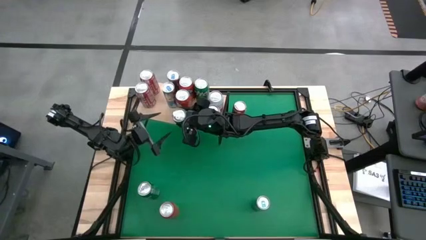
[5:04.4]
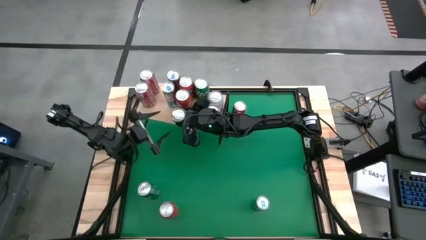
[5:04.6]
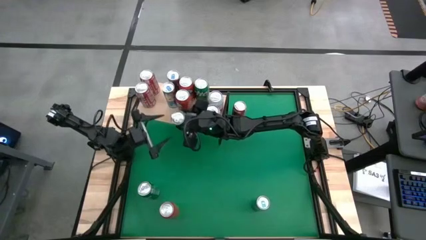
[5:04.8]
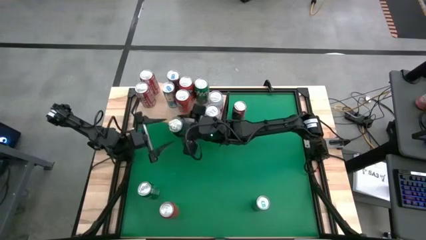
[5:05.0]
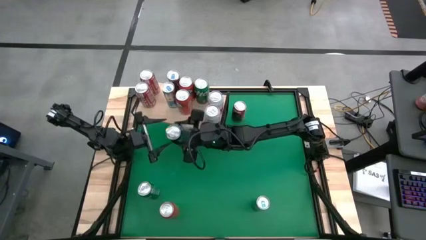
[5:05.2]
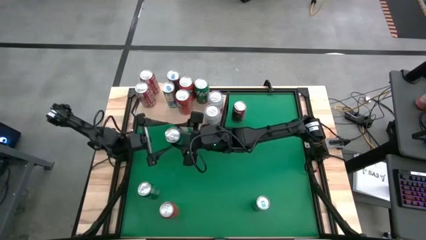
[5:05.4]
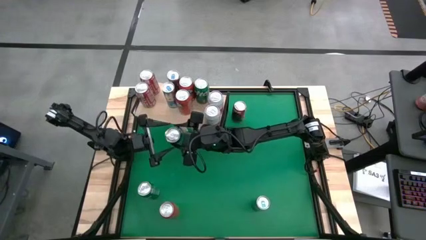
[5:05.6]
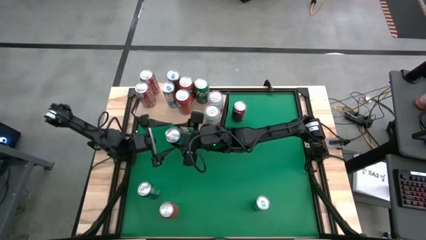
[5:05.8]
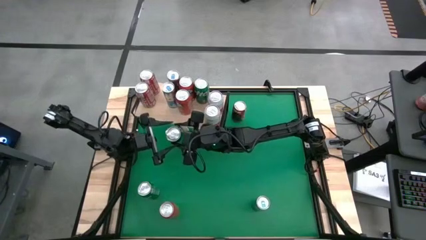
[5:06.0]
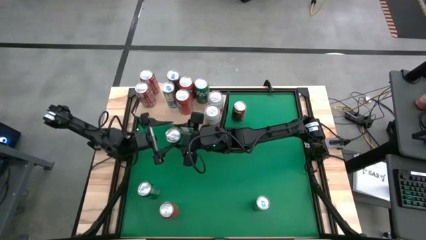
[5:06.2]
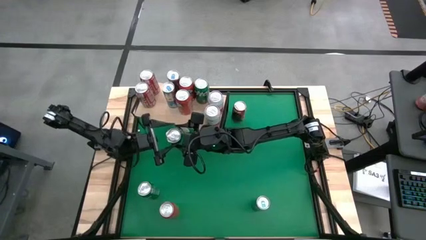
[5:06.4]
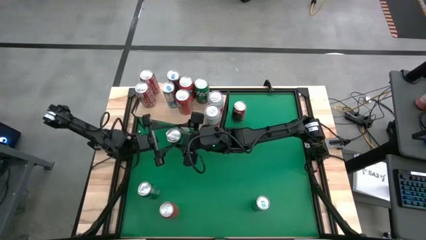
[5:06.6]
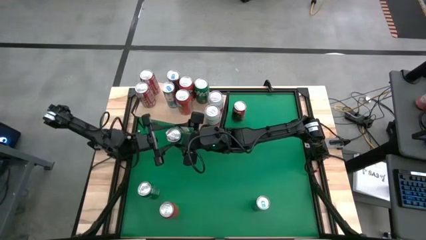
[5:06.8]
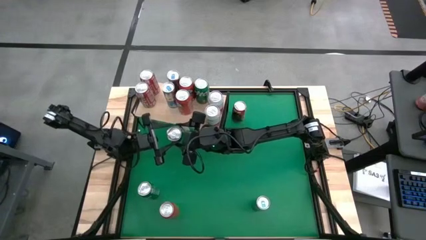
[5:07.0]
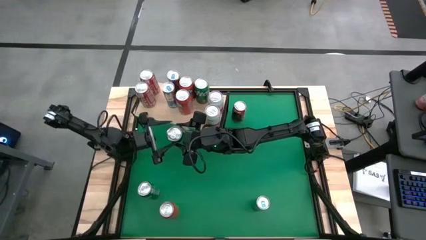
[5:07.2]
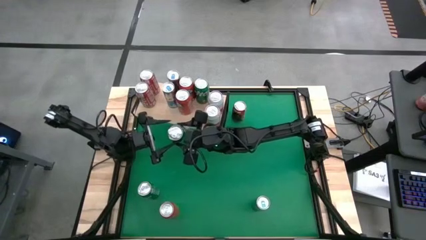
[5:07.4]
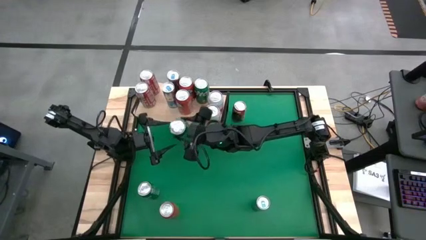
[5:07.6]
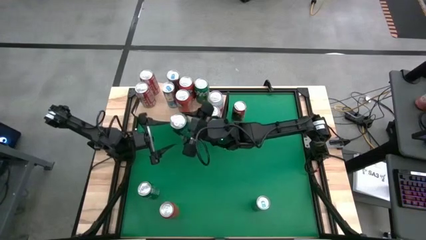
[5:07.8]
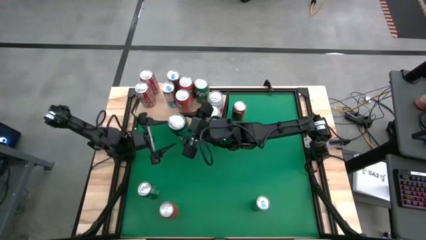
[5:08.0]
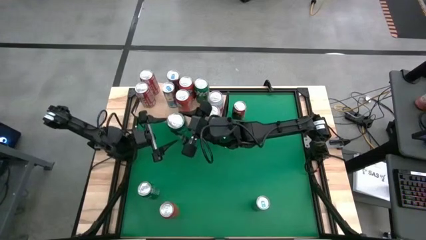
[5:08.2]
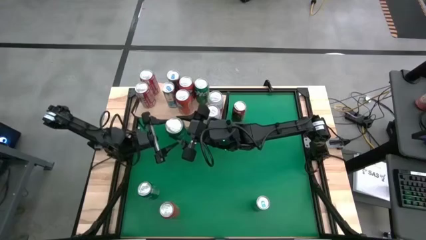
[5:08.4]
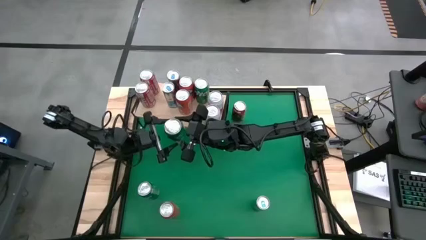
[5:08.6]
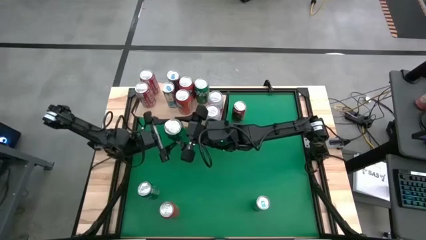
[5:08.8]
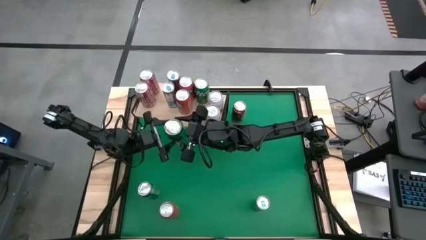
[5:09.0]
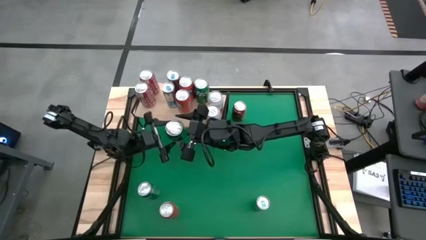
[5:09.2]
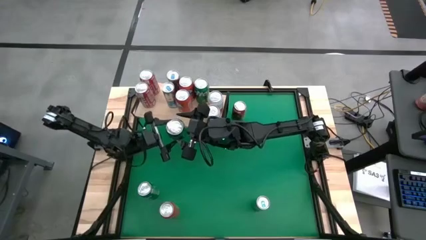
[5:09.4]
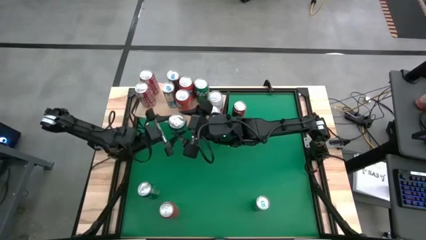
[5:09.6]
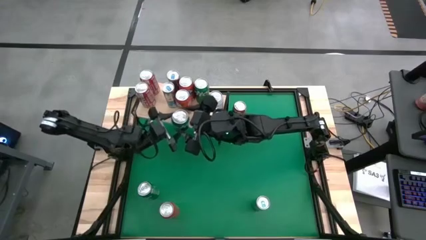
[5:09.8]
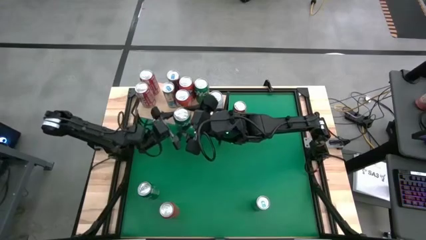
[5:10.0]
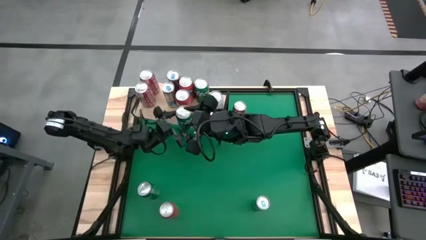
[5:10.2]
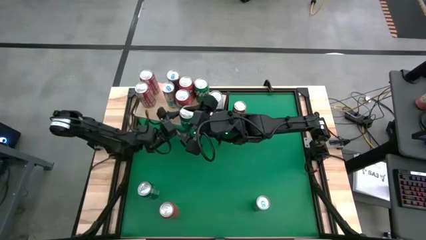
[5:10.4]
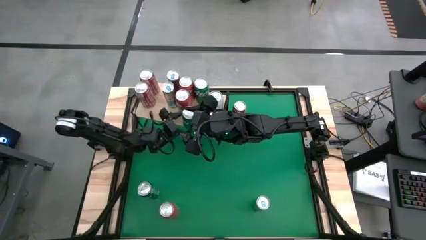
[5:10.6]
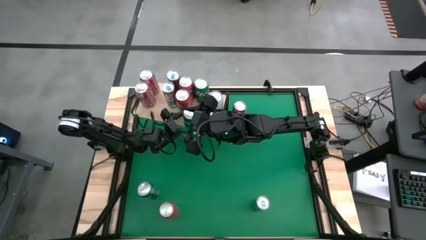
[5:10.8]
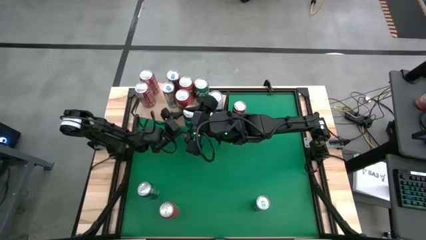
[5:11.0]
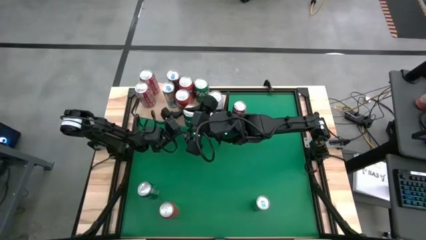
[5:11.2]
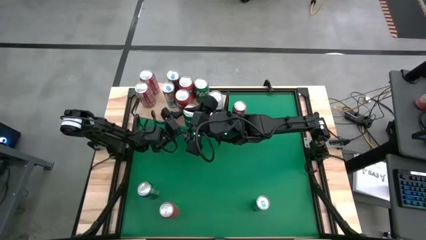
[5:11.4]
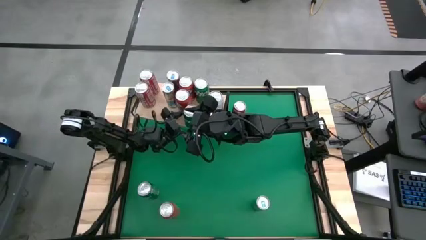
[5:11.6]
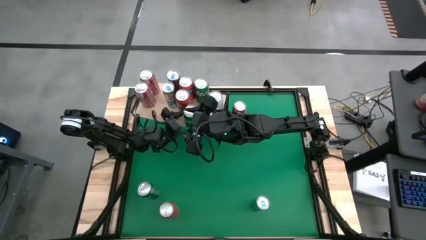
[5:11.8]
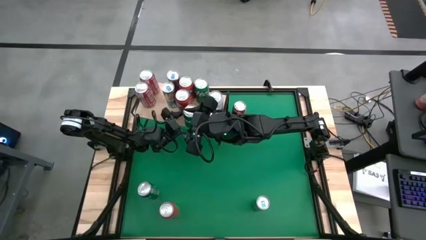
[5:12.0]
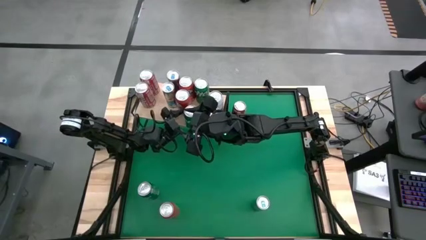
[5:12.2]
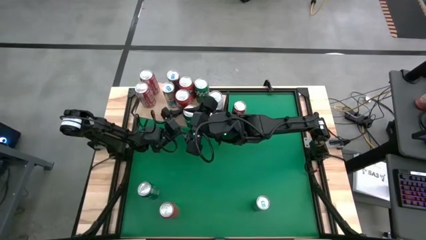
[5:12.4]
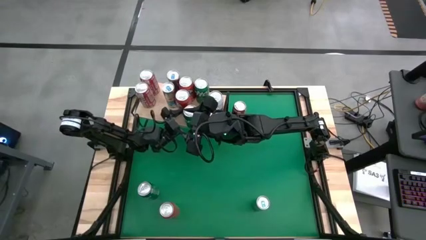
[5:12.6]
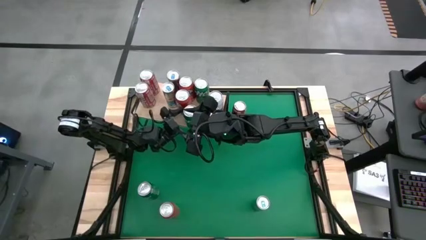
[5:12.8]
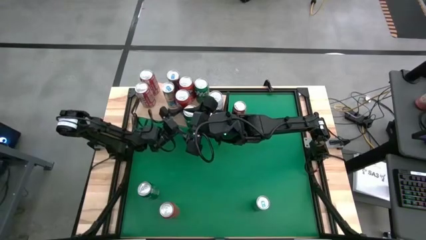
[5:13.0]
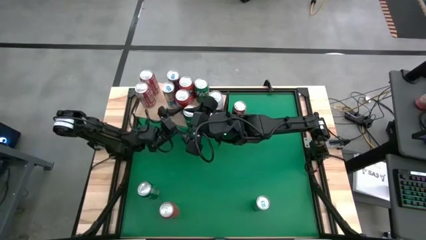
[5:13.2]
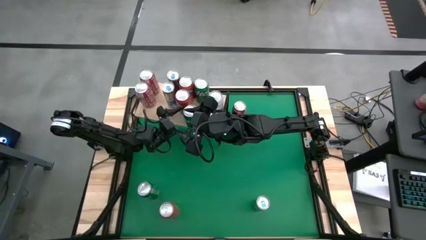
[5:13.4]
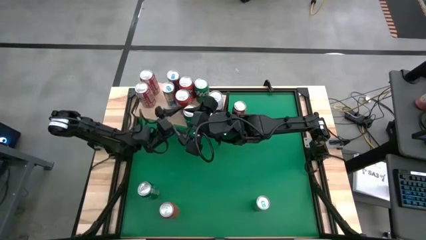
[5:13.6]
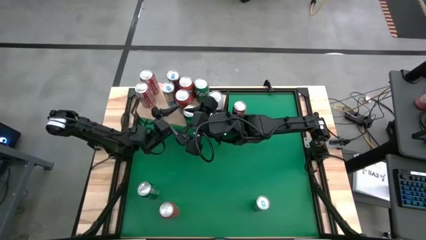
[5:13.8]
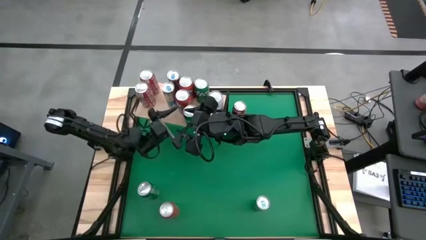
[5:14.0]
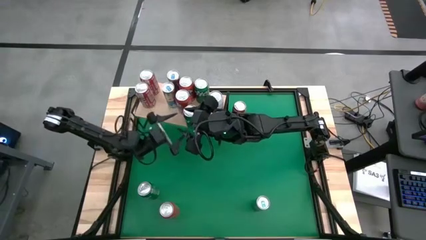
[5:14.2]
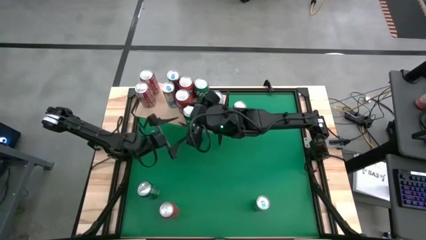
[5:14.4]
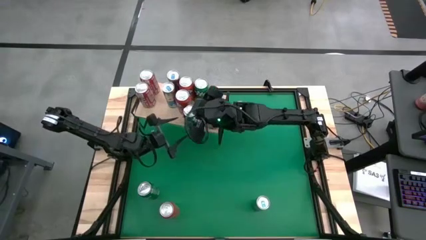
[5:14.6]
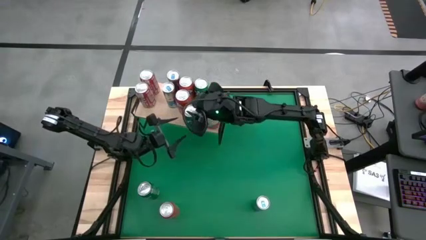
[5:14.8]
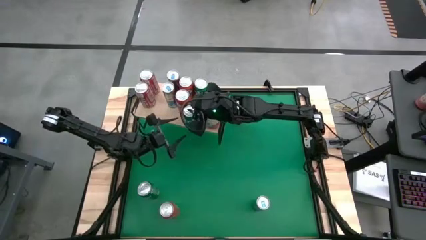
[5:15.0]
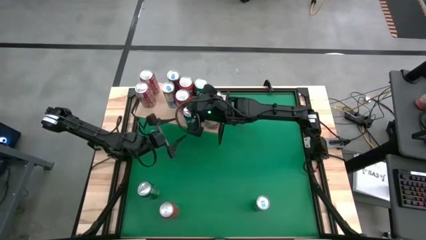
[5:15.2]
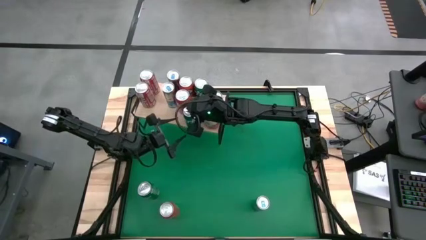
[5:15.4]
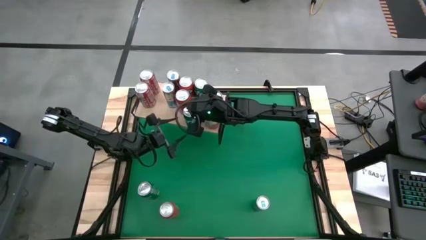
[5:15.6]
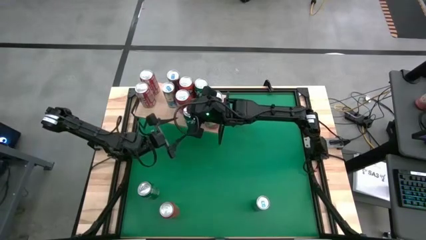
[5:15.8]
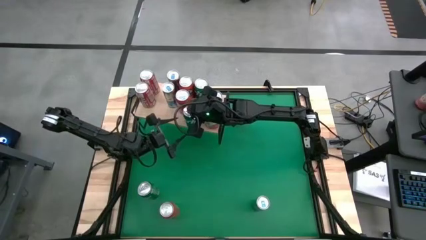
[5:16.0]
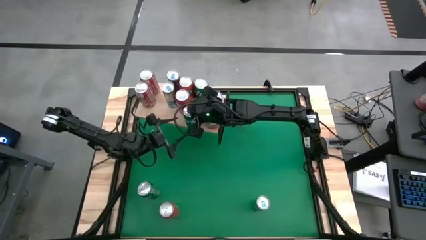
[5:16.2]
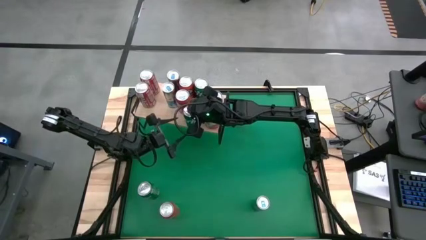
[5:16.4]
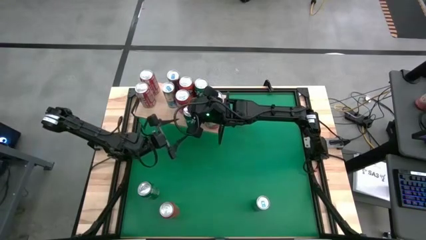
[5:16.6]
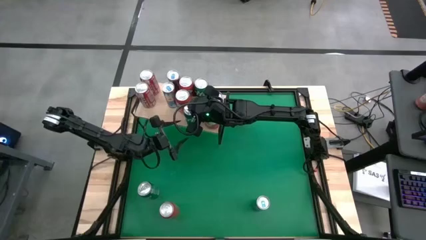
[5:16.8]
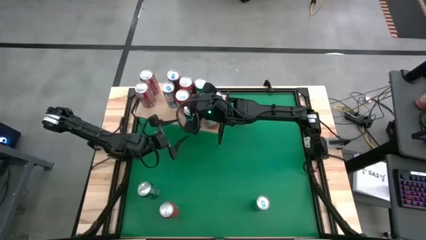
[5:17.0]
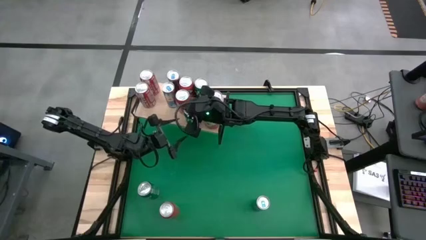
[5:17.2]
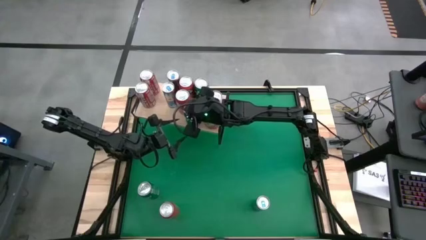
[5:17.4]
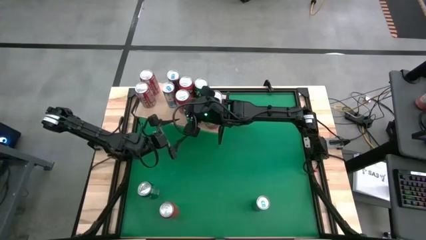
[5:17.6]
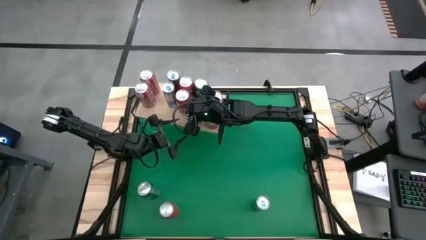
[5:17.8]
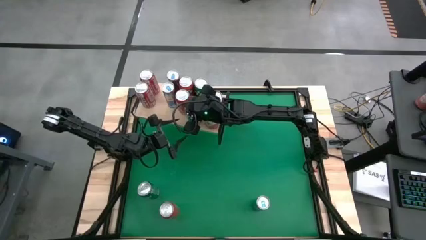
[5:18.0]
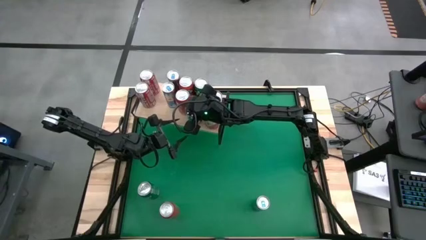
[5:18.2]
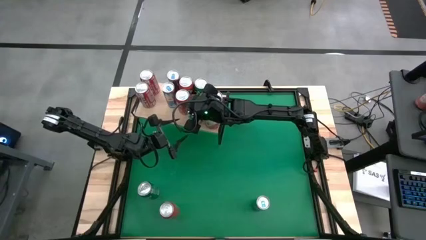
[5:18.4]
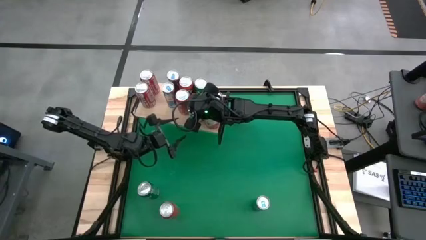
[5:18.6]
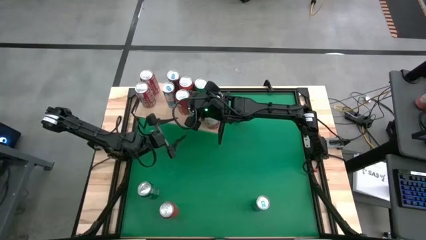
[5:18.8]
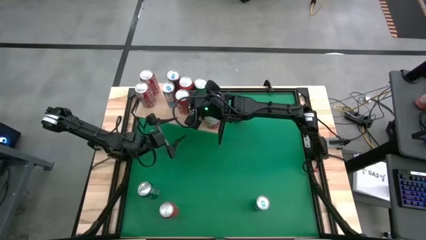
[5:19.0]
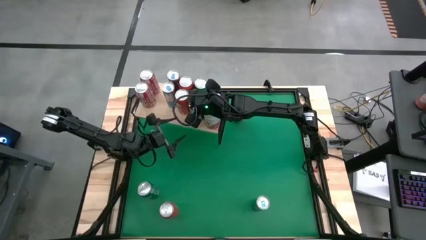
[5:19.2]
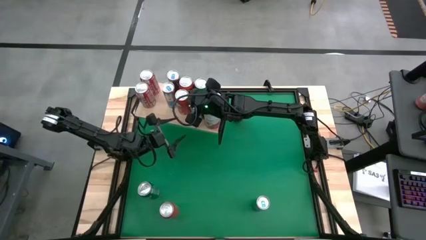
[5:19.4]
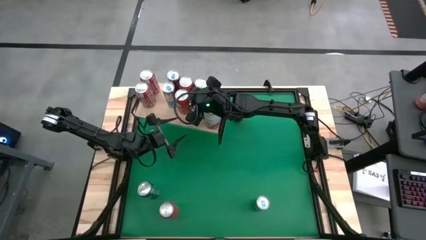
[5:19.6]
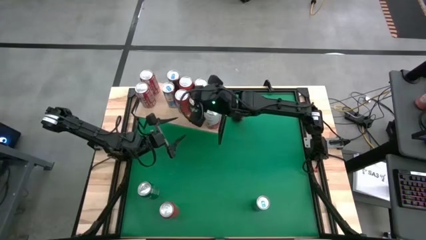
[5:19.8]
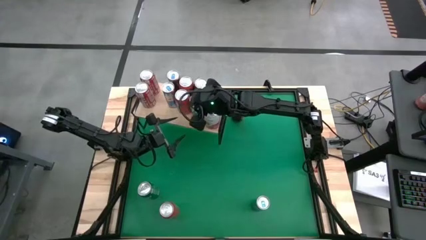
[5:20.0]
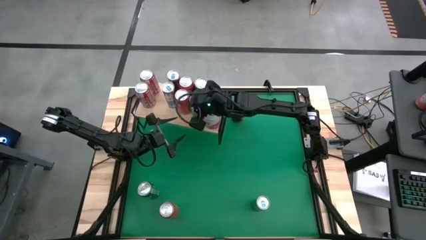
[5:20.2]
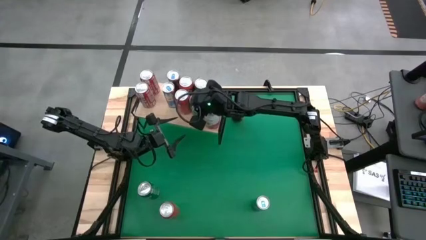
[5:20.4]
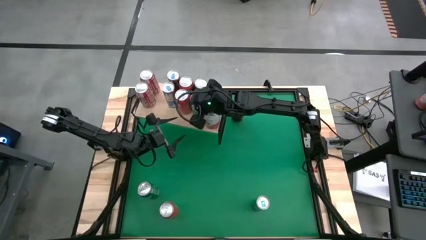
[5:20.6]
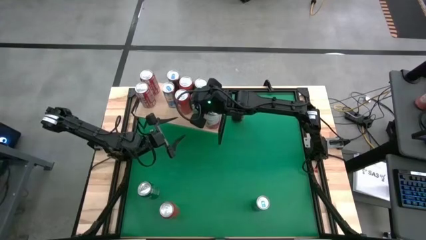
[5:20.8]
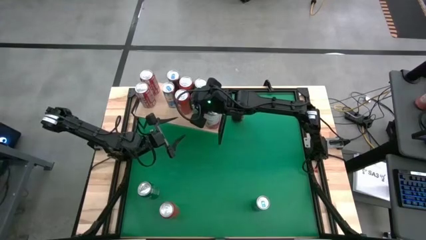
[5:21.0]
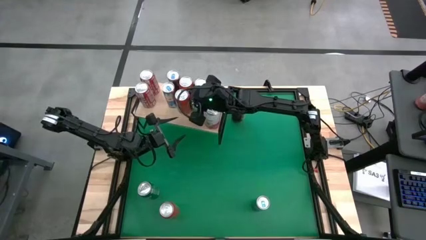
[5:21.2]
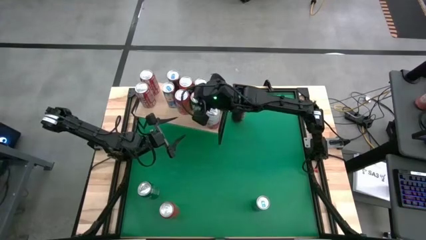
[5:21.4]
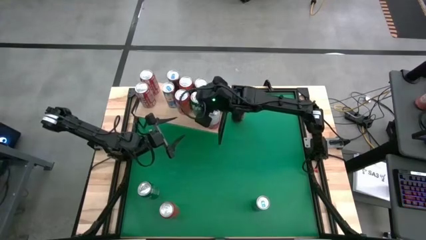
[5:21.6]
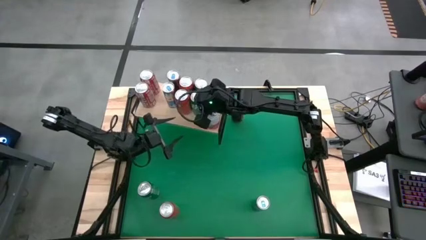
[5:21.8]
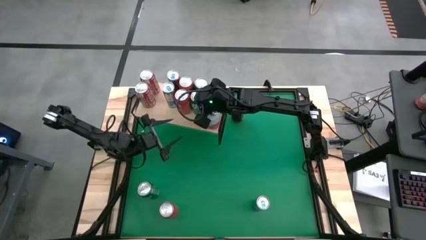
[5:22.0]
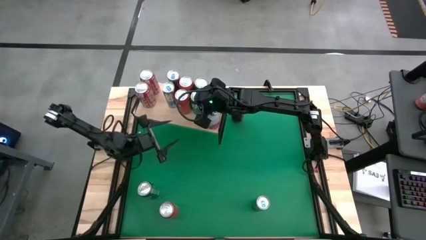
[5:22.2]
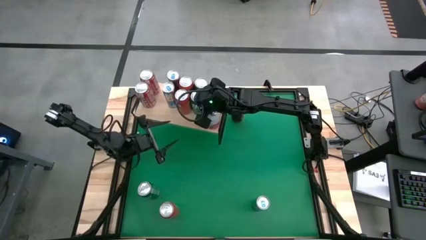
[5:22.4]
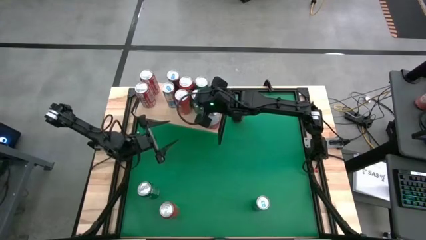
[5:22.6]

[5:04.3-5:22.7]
Task: Place canned beverage on shelf
Put the green soda can on the shelf aligned with the other green soda can
